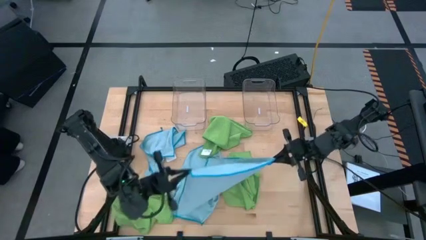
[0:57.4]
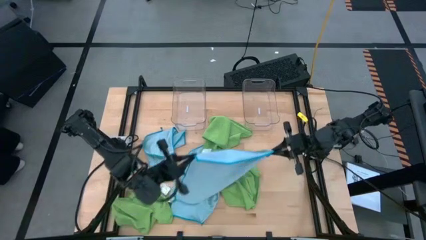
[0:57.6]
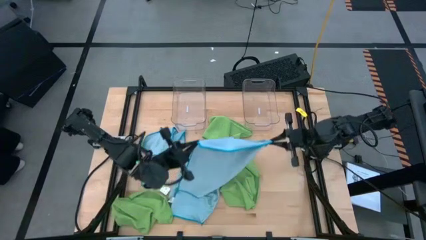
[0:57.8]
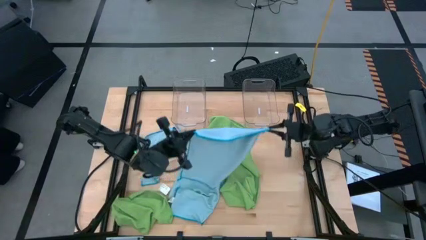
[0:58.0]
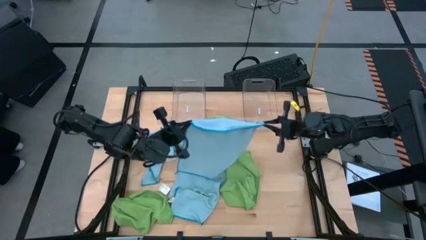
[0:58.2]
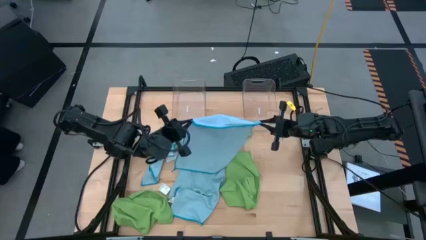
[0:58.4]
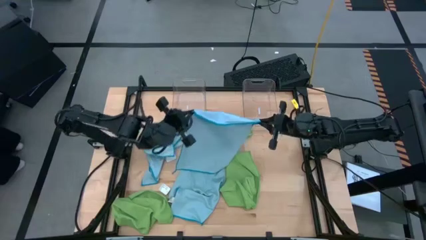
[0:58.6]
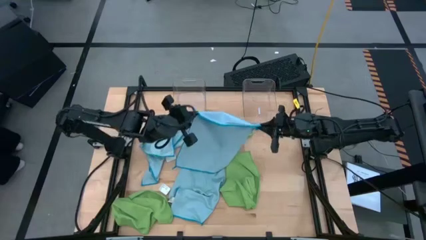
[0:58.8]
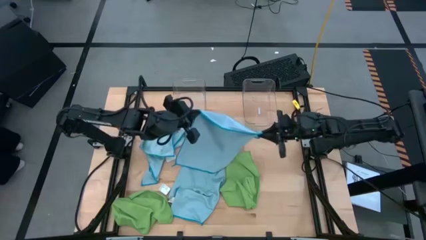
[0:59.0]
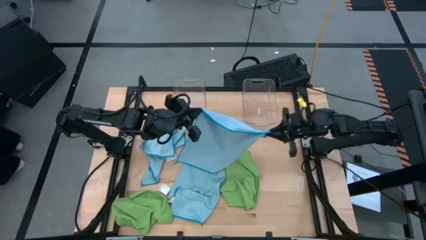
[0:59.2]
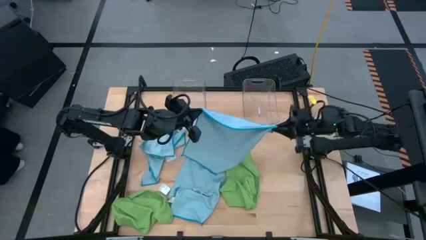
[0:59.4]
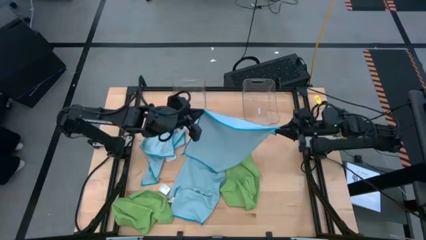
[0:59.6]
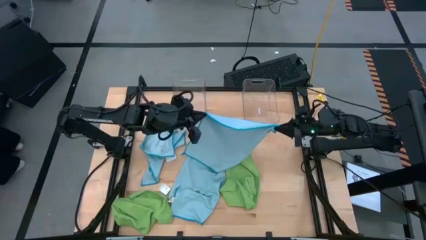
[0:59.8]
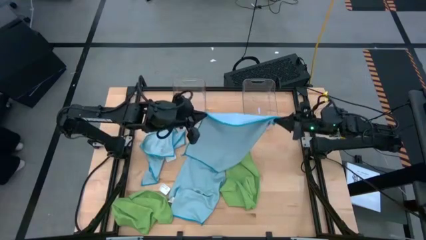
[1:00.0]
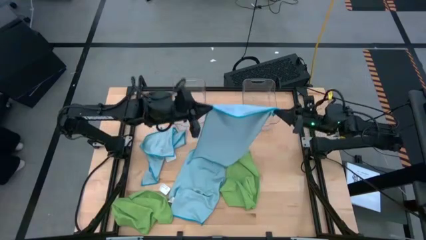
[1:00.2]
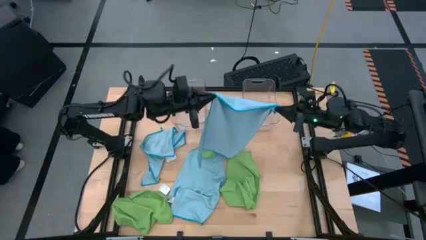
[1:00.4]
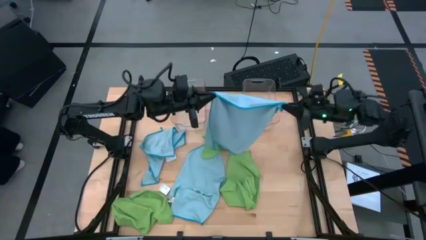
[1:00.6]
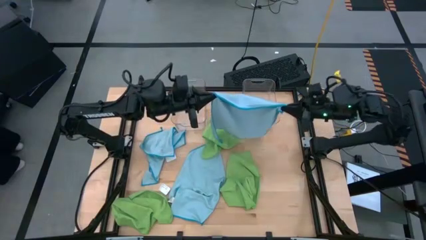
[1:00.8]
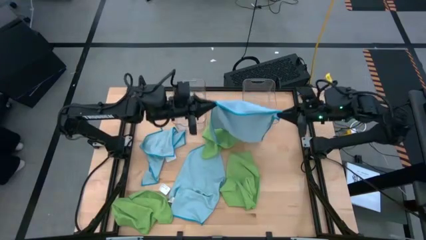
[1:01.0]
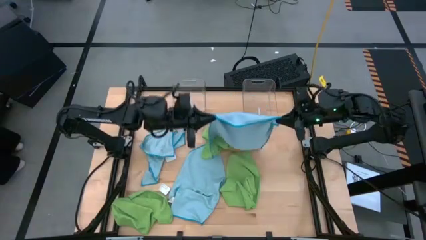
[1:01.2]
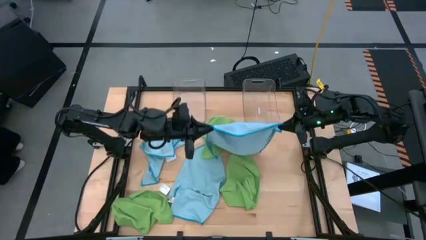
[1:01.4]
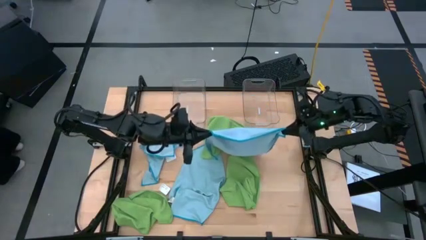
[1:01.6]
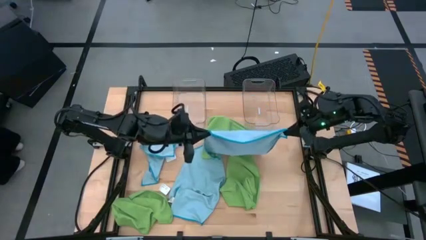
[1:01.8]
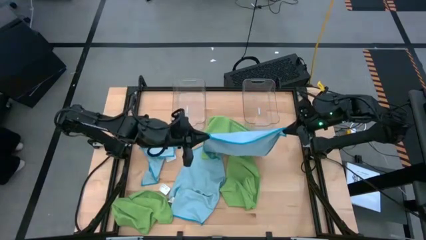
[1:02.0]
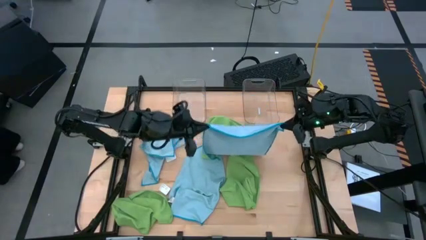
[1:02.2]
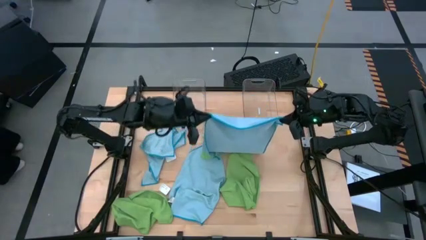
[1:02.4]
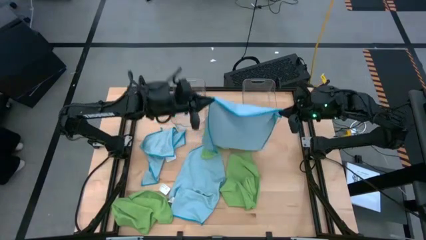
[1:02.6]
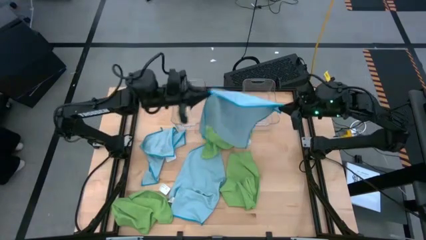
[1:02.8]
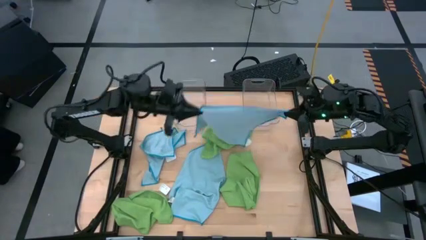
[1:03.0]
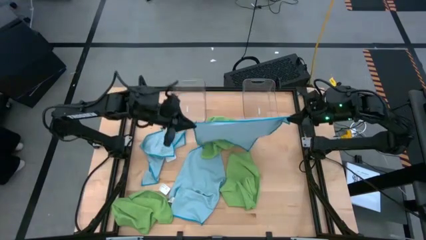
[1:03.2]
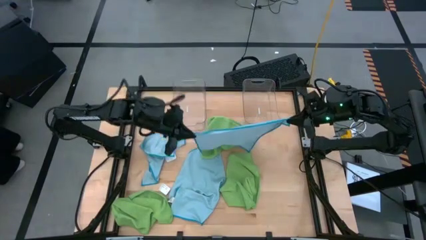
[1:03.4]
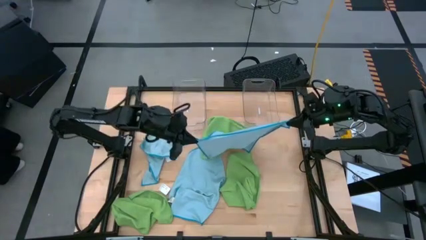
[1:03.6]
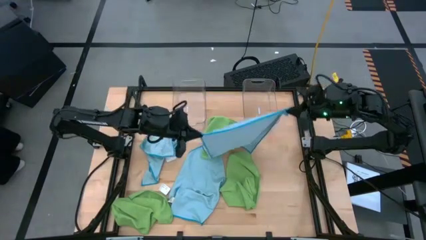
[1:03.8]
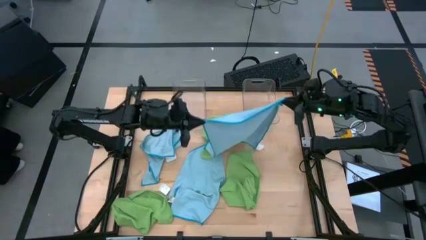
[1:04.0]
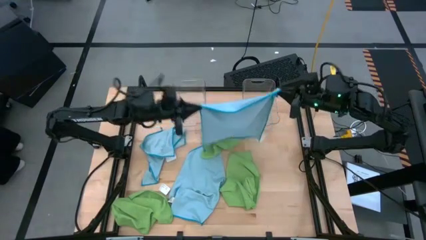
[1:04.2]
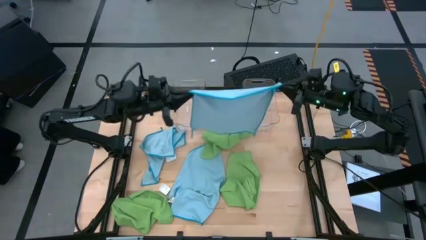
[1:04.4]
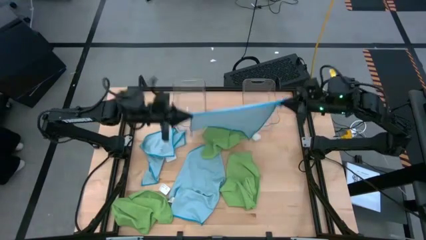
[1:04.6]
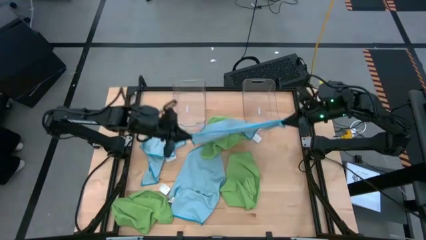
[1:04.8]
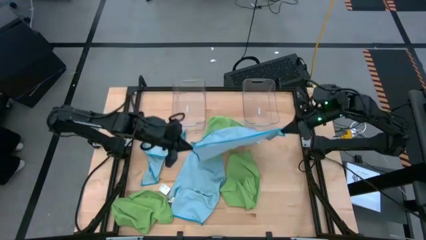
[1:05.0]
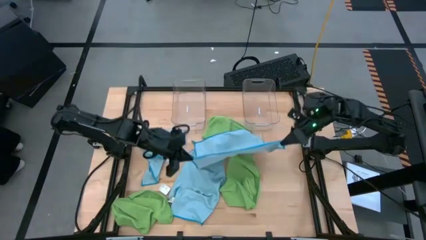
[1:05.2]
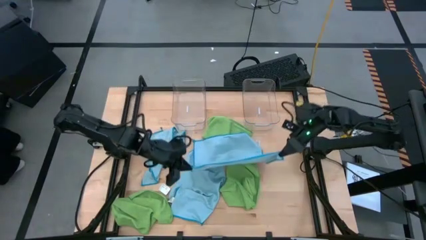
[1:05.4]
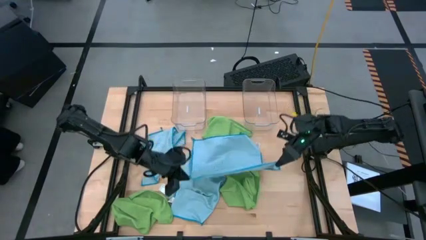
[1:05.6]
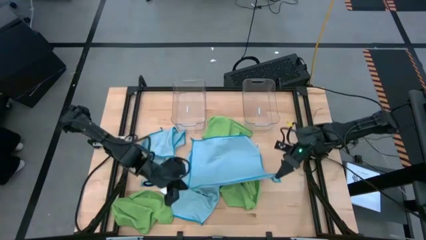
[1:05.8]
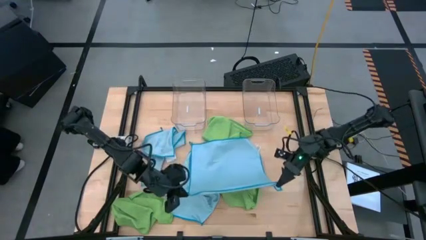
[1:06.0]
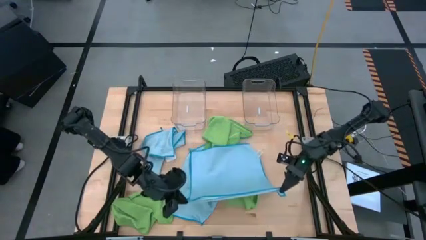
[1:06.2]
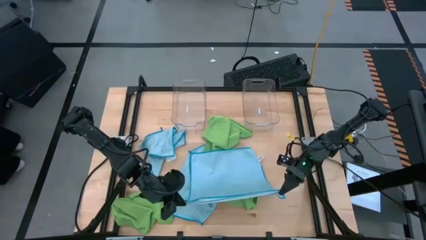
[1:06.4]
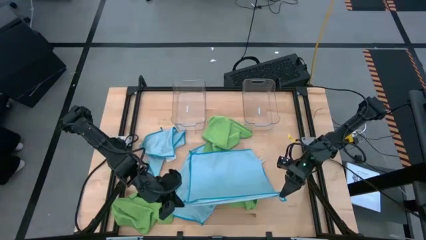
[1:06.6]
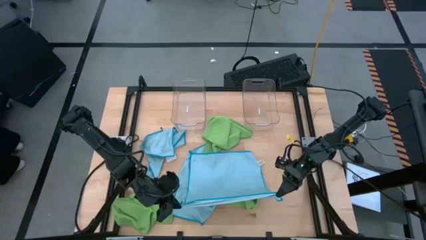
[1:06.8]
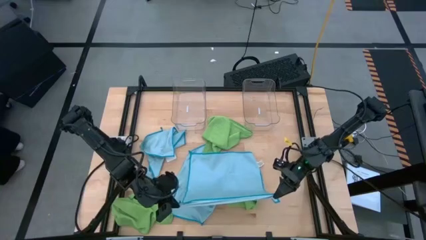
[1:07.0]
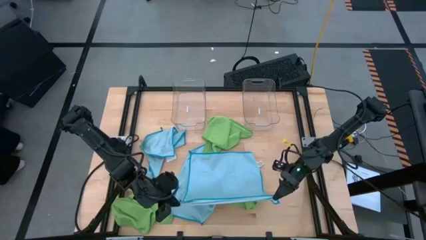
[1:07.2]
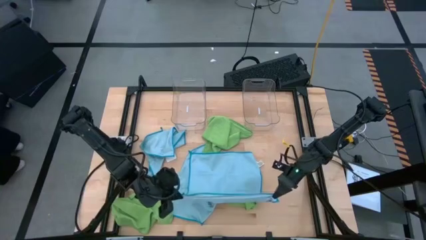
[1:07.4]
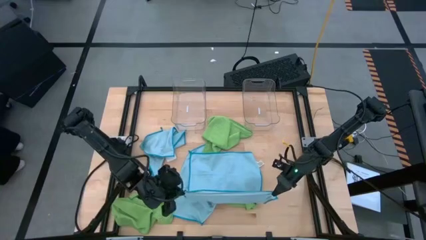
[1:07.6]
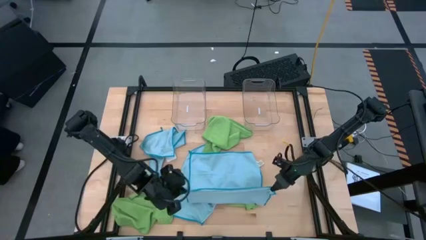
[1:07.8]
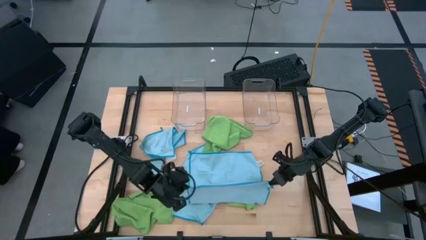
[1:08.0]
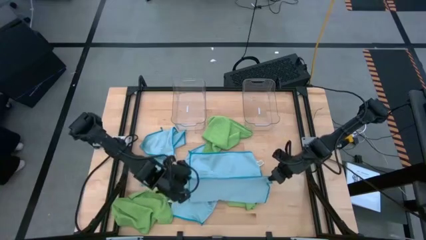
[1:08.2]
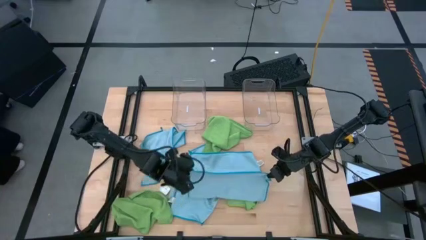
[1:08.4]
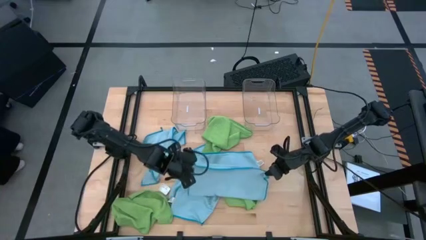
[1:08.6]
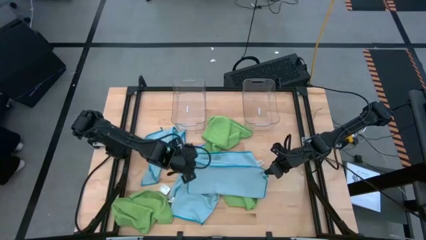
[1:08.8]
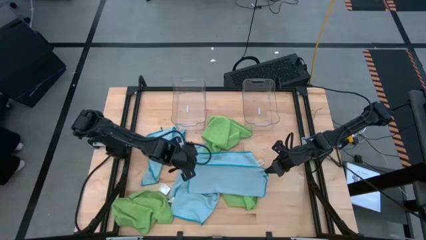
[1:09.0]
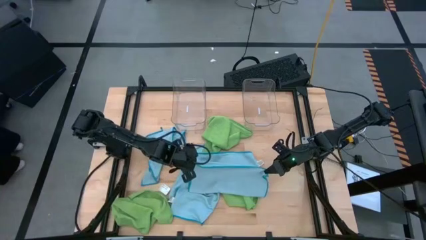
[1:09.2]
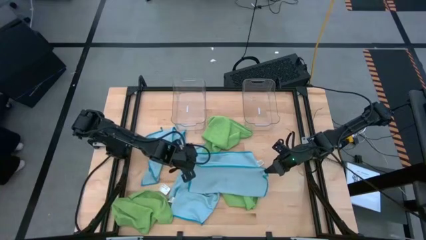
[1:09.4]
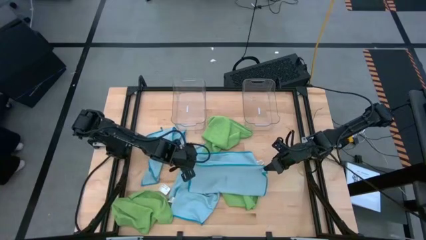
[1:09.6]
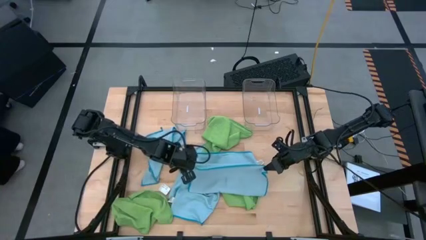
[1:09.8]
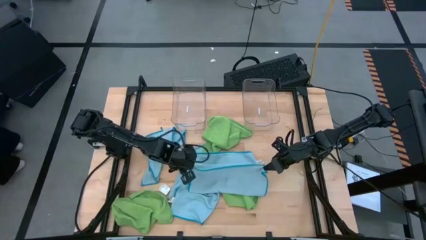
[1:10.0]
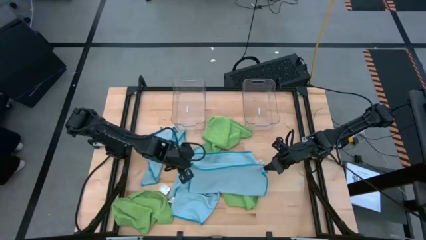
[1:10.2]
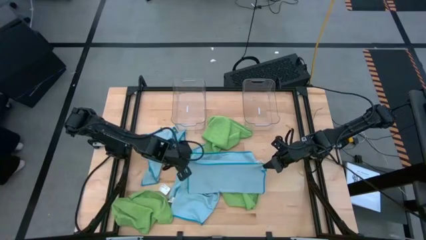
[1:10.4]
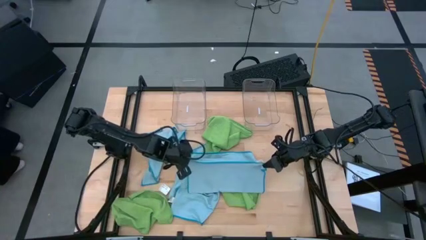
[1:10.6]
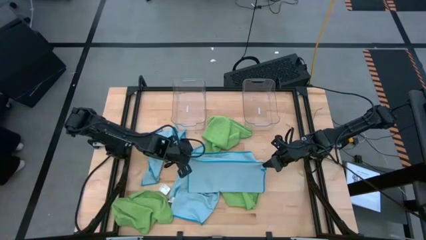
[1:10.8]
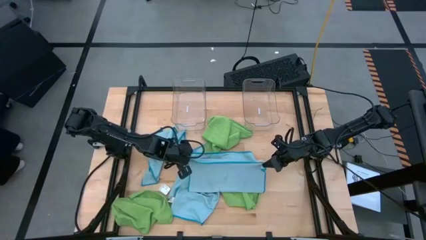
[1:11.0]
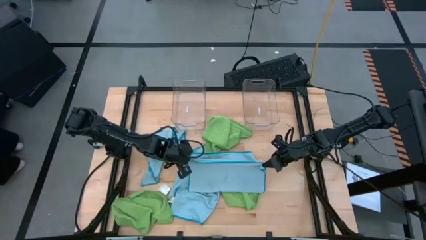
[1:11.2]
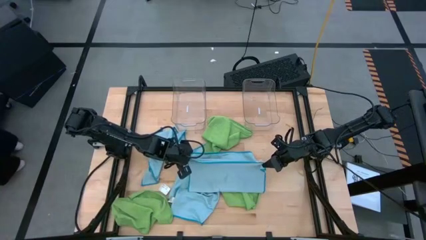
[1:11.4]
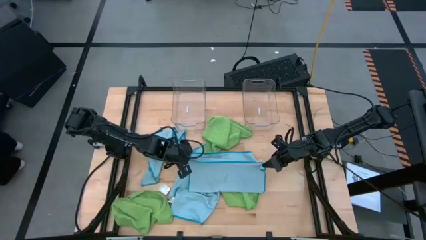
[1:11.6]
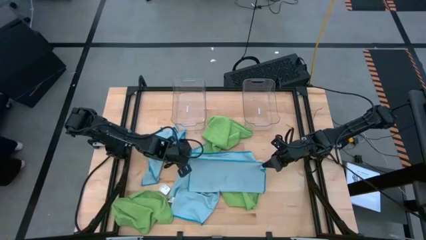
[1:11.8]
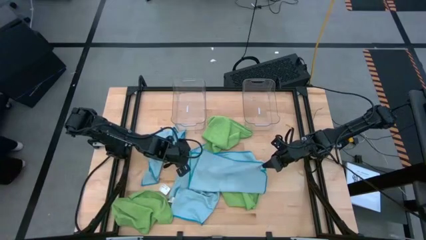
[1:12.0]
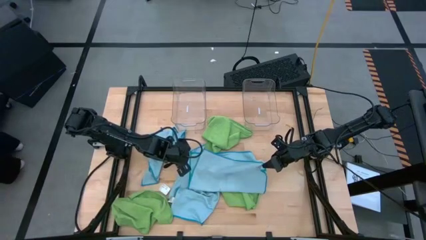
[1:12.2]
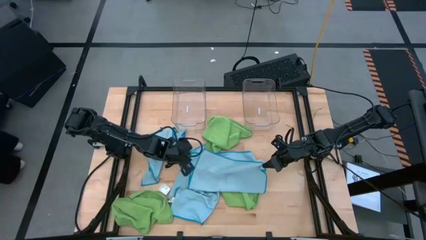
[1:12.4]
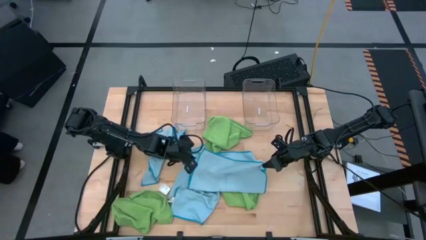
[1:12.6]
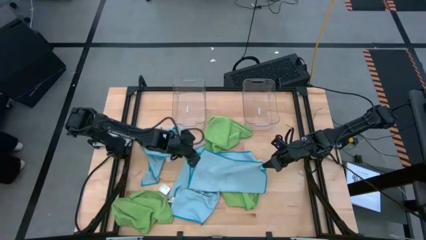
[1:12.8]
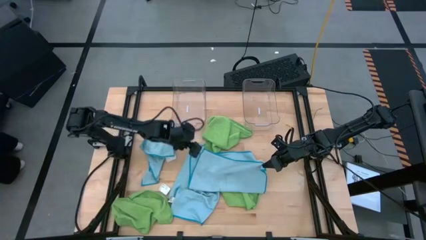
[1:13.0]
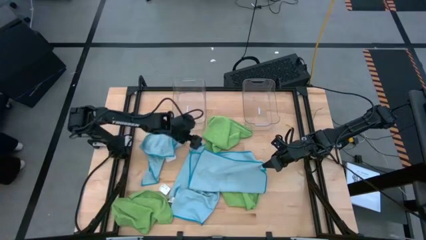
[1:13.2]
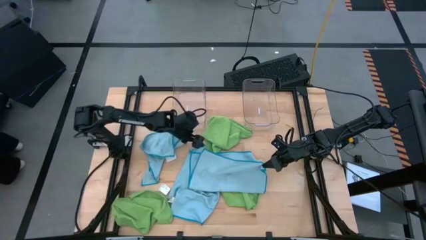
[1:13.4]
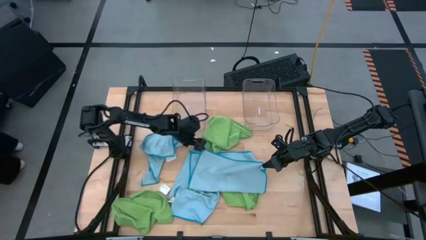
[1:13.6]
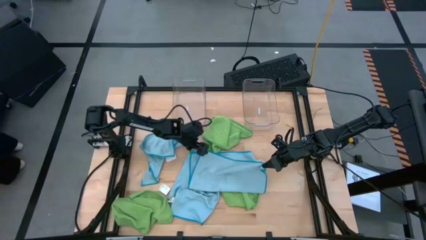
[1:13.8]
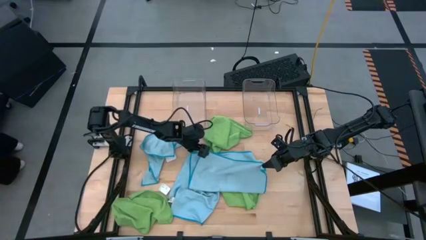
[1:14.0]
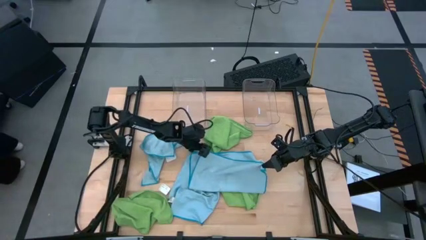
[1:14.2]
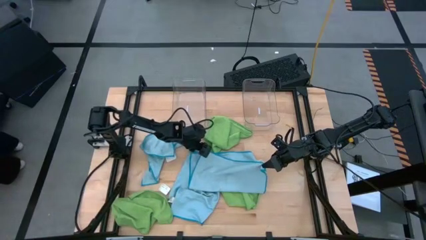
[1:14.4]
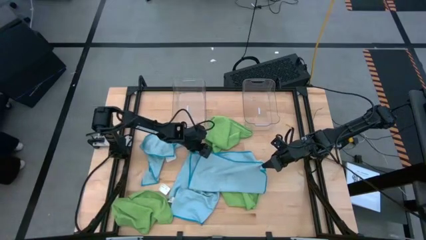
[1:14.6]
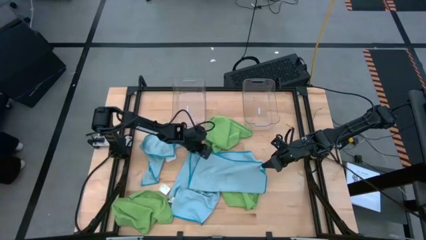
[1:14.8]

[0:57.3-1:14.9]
Task: Fold microfiber towels
Fold the right blue microfiber towel
